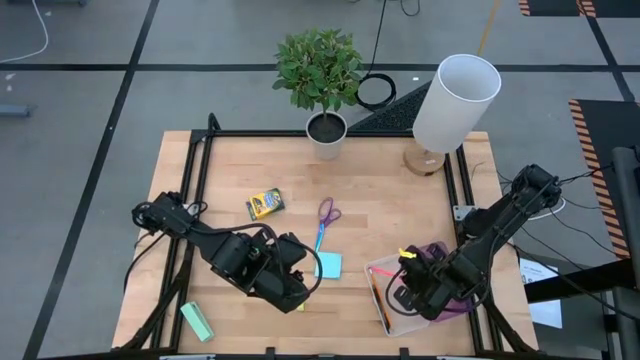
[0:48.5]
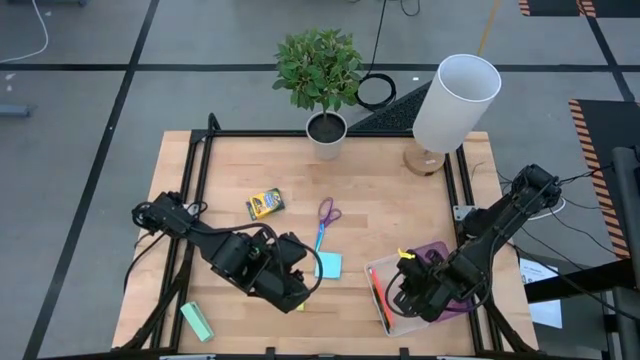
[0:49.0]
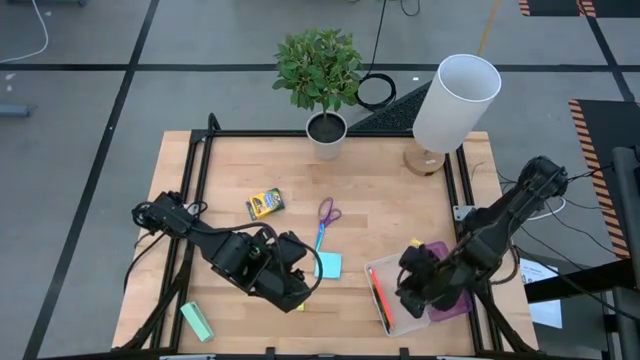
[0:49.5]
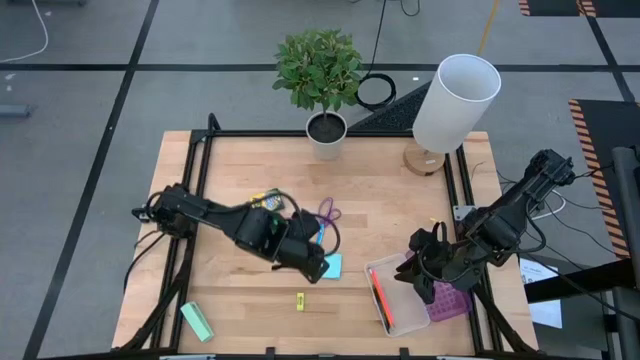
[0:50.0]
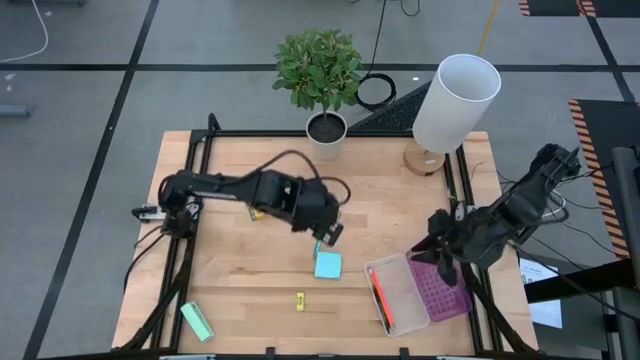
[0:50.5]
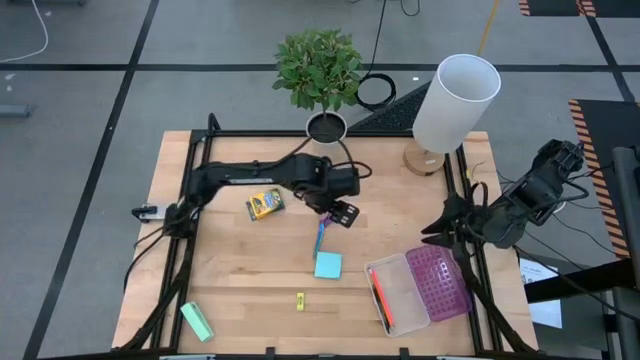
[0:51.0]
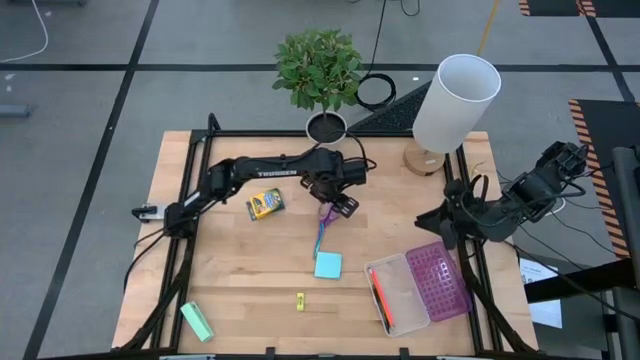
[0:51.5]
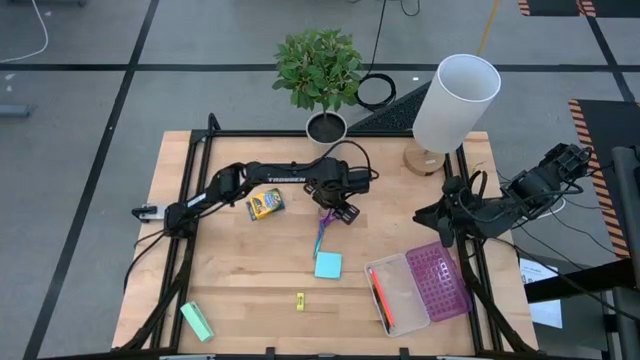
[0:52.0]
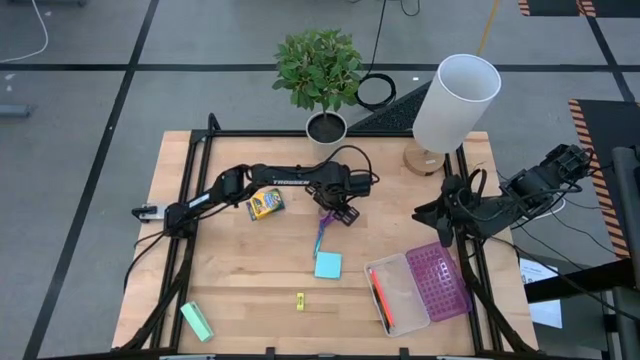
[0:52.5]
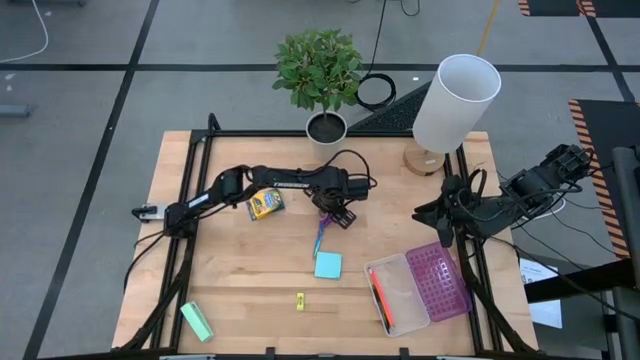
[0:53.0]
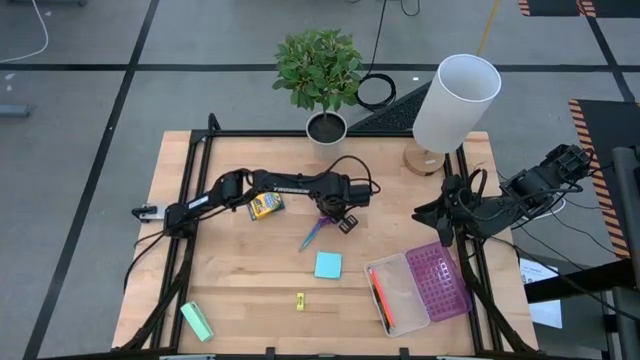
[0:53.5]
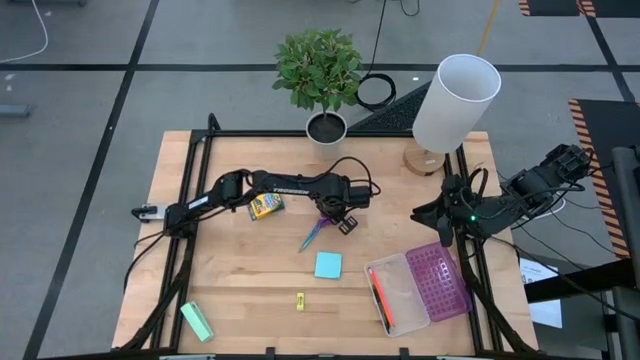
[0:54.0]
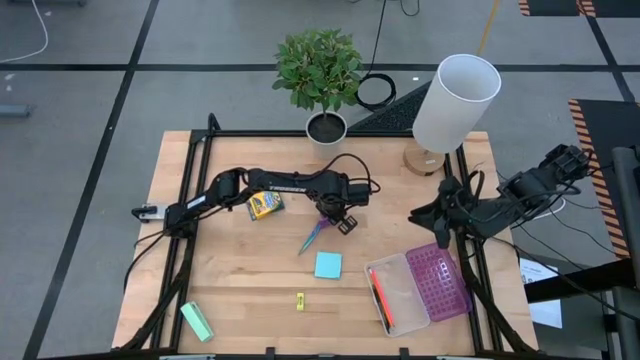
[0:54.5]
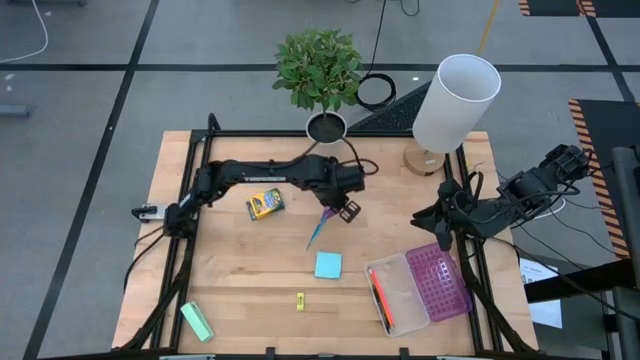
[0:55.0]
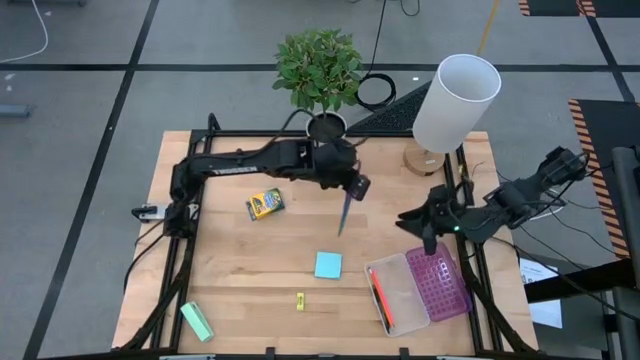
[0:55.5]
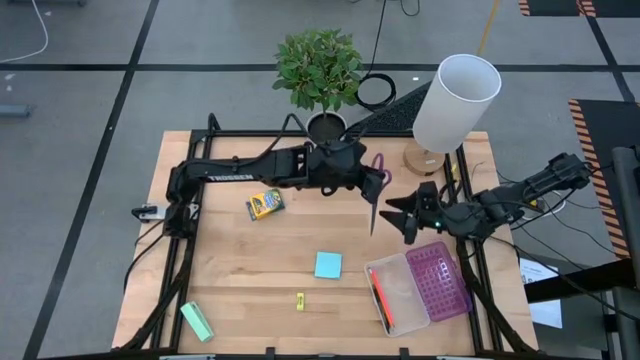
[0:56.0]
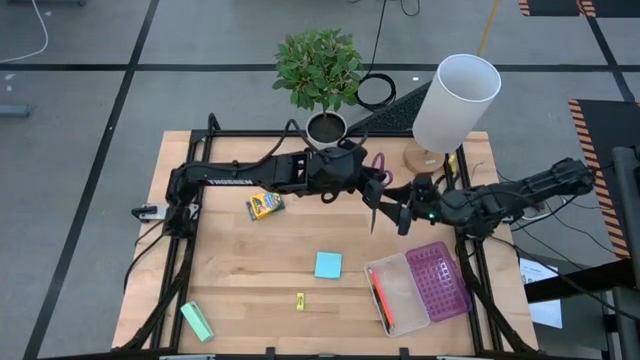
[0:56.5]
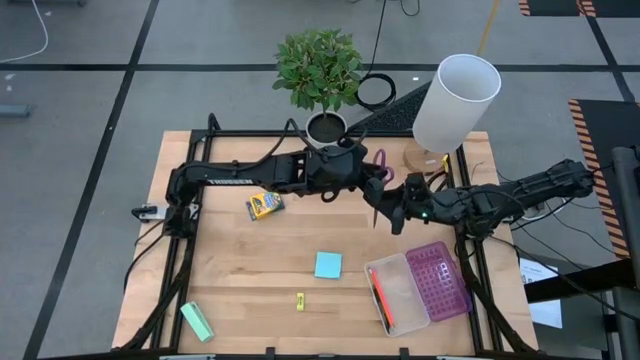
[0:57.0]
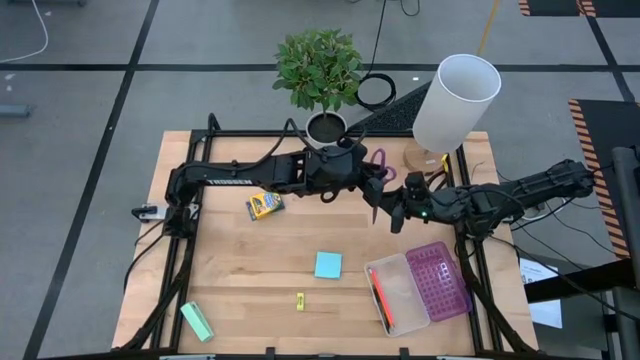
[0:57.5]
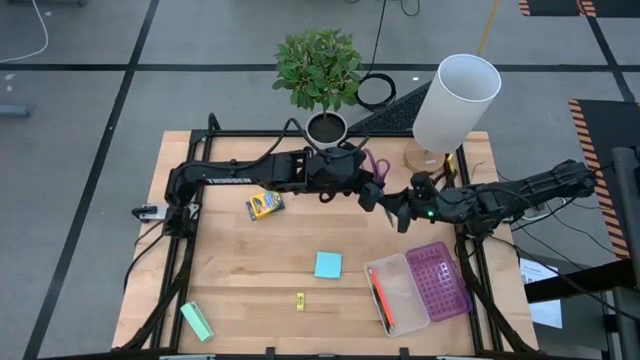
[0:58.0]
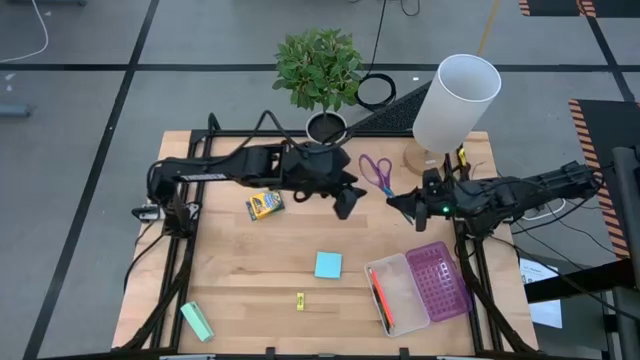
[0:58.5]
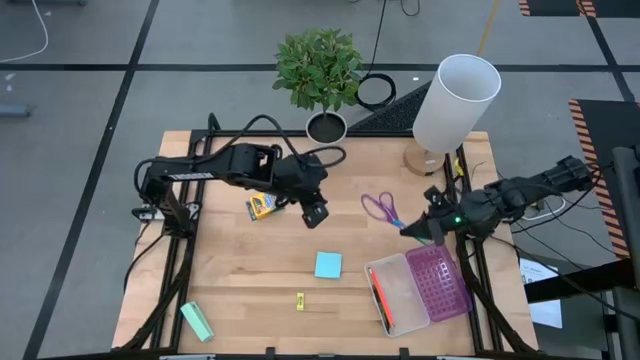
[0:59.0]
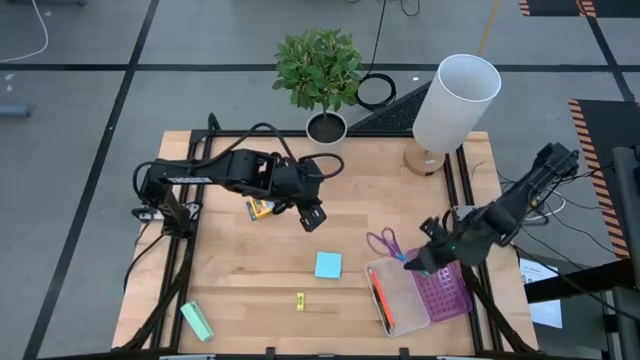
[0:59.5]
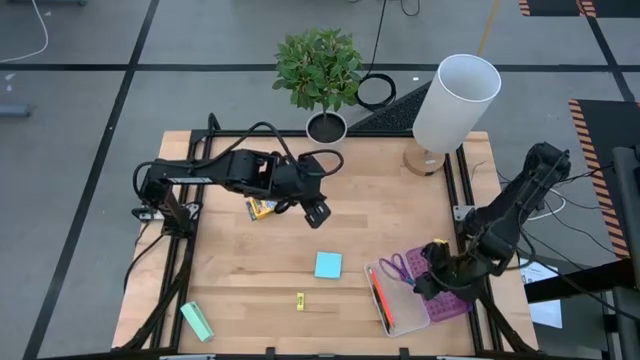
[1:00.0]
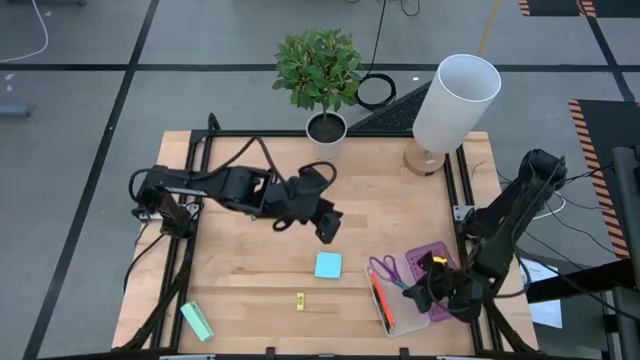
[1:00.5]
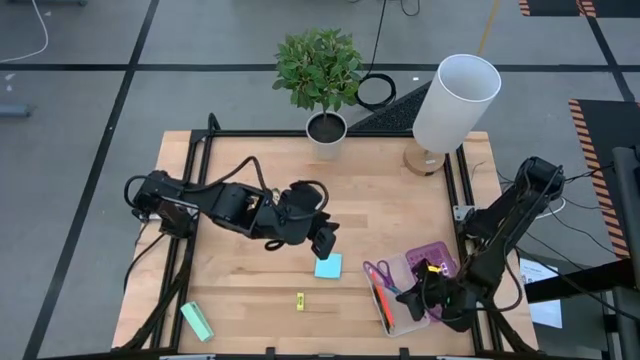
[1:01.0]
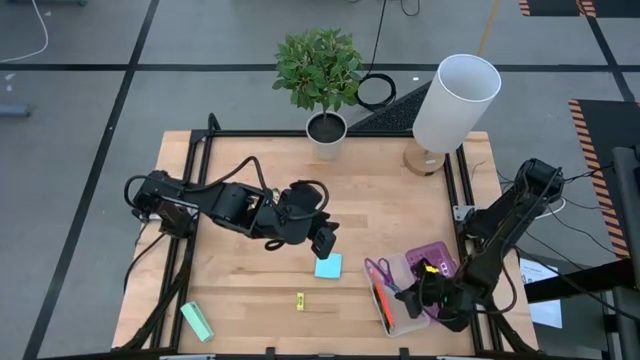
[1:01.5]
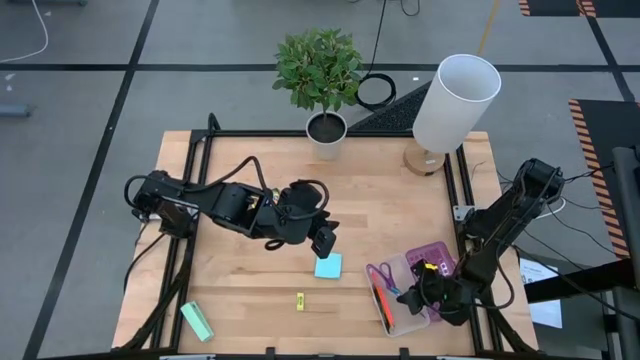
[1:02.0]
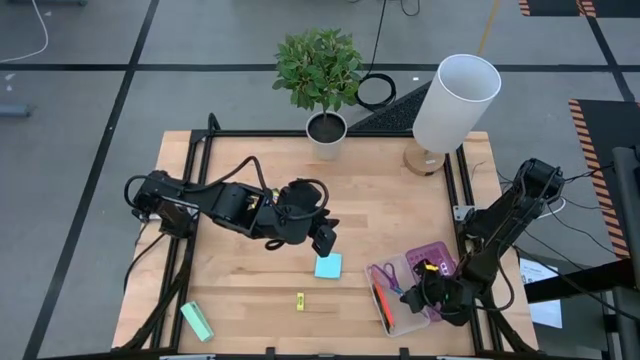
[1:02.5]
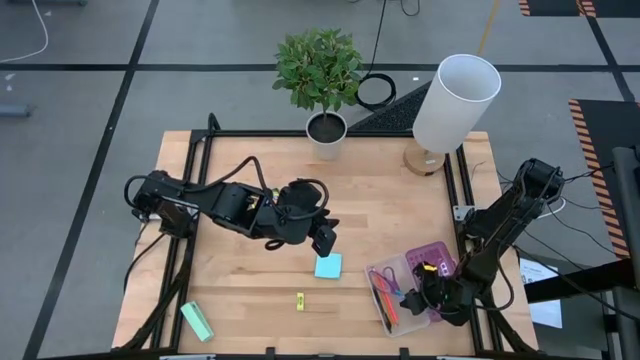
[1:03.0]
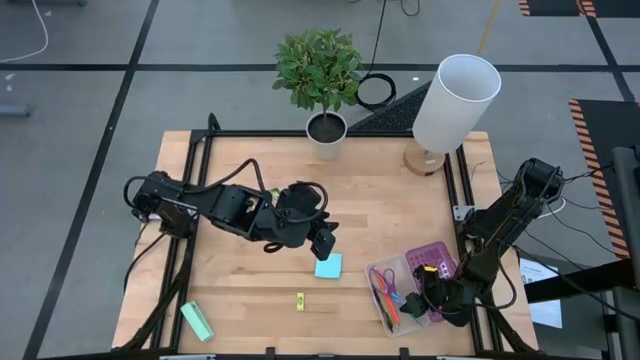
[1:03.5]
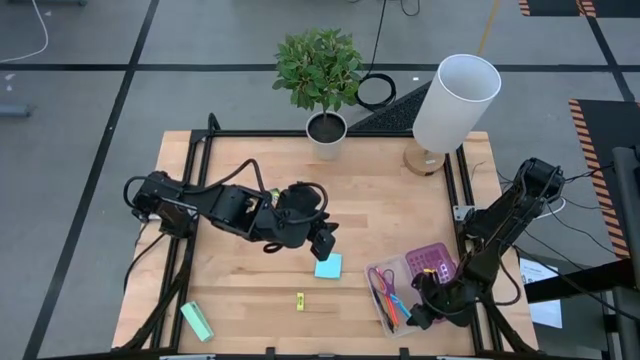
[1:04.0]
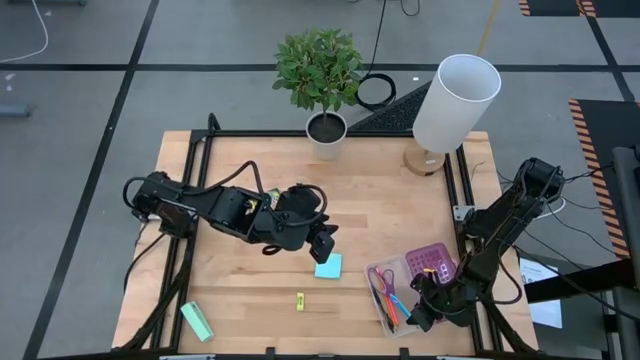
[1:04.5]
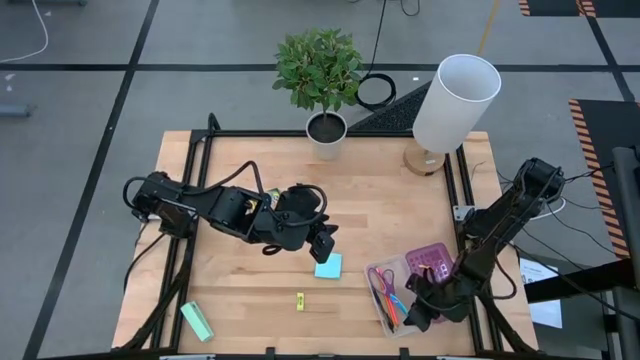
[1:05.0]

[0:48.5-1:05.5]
Task: Pack school essentials
Put the purple scissors into the purple supply box
